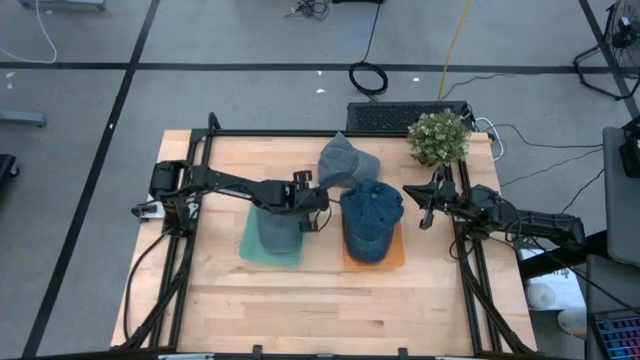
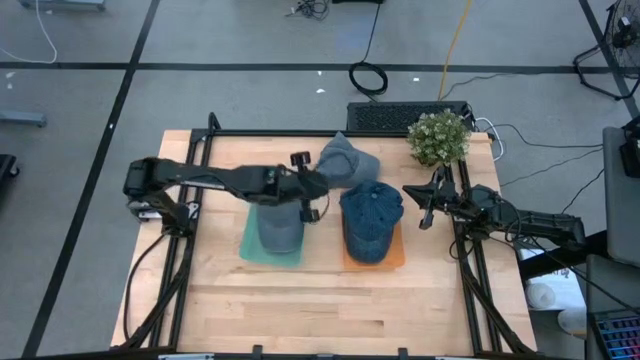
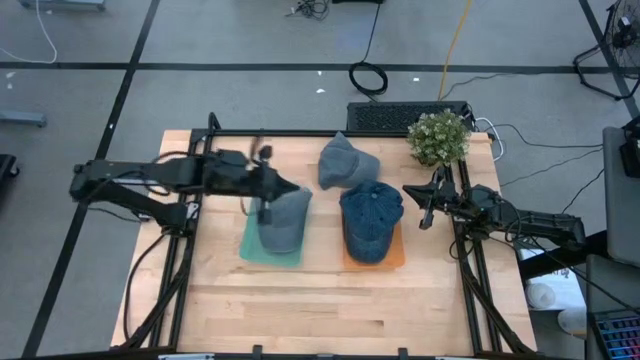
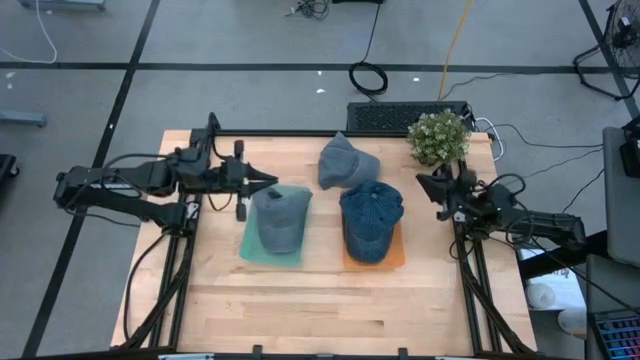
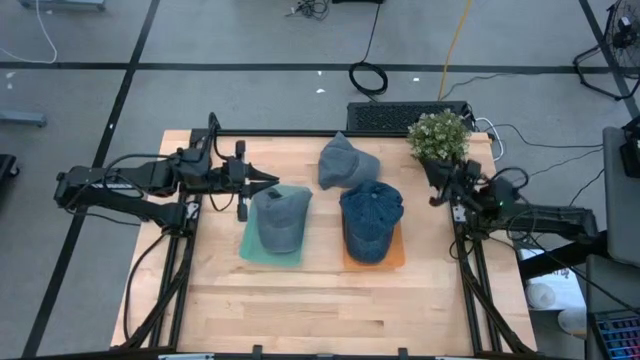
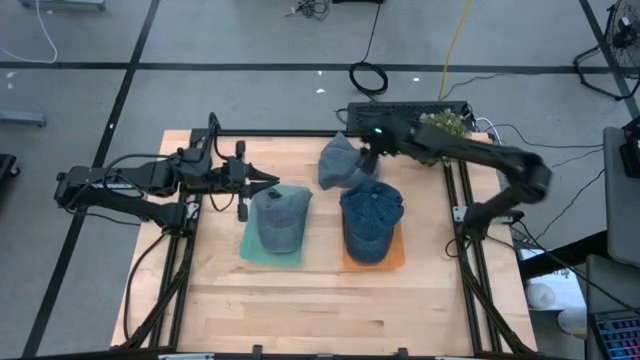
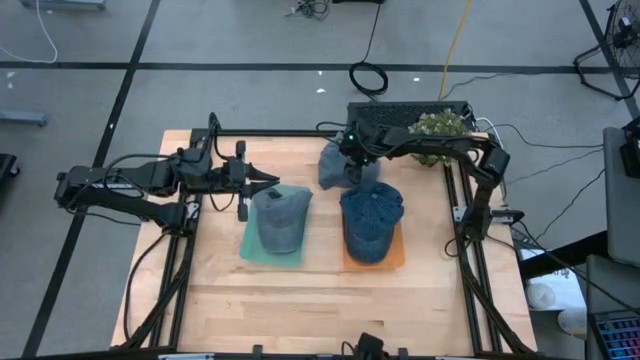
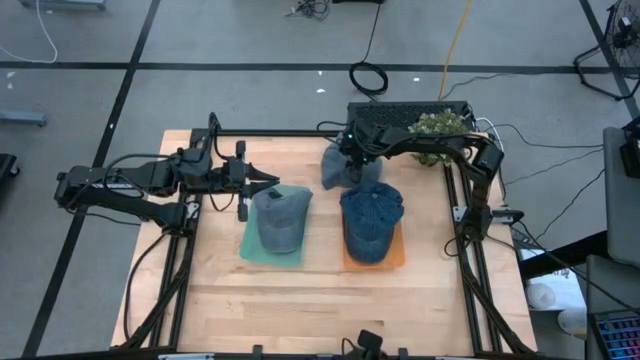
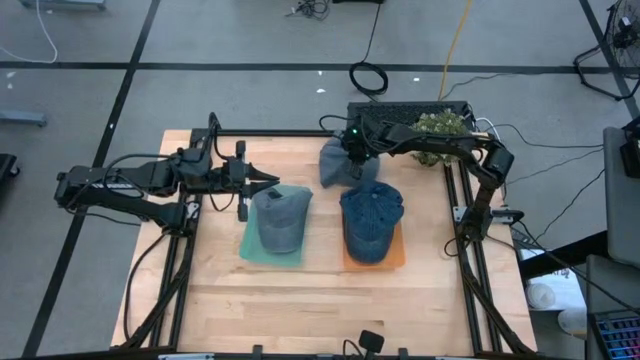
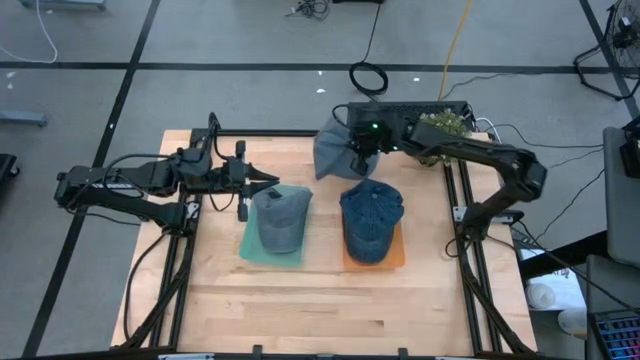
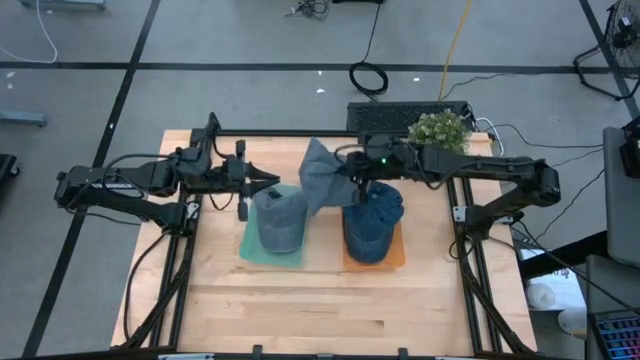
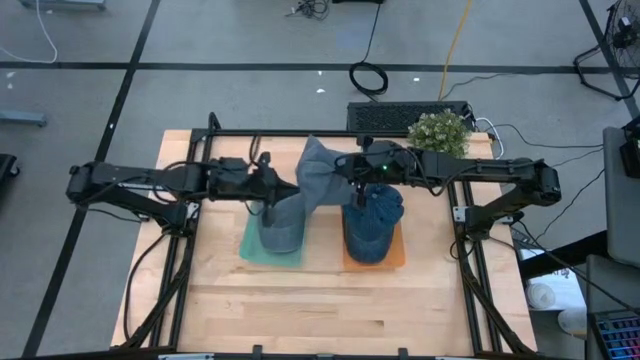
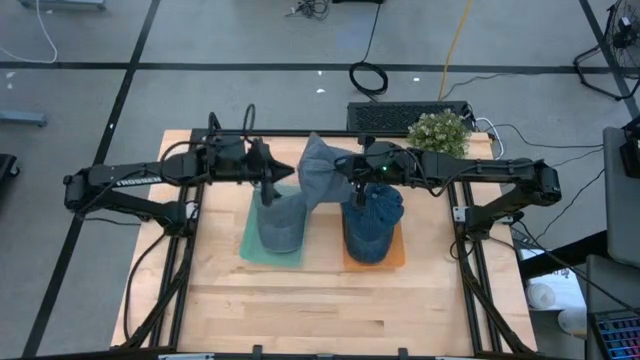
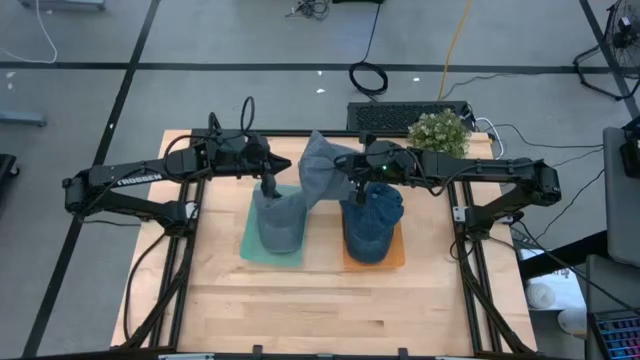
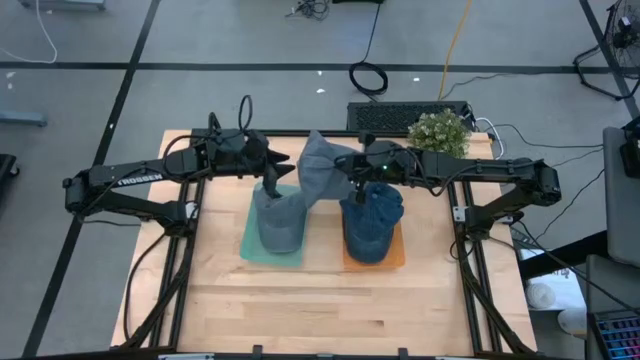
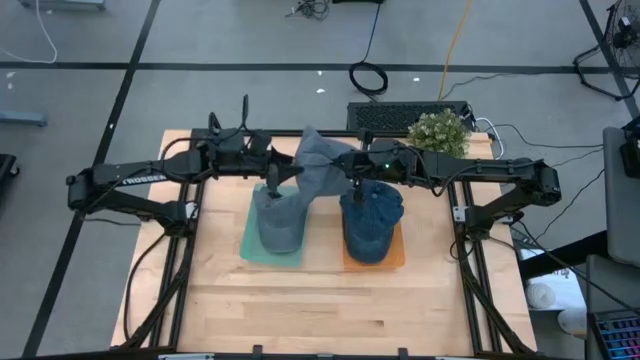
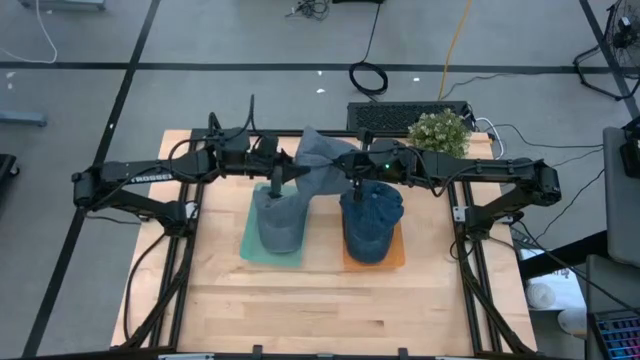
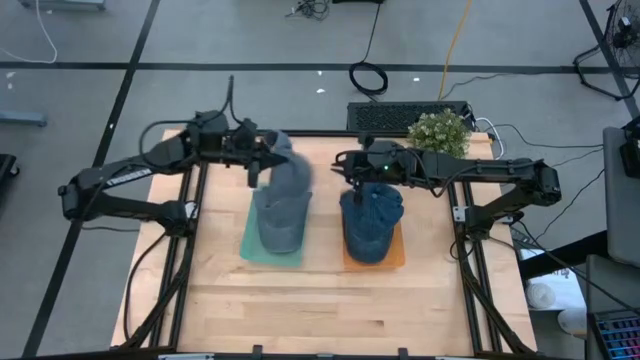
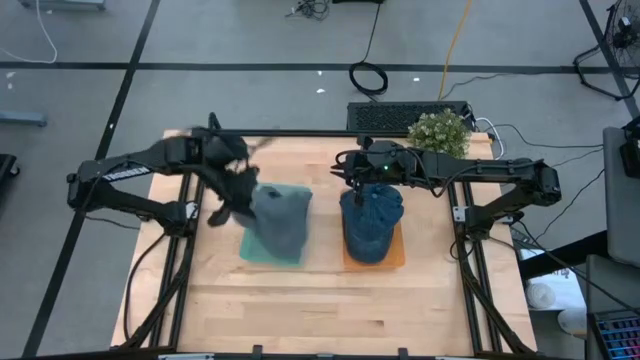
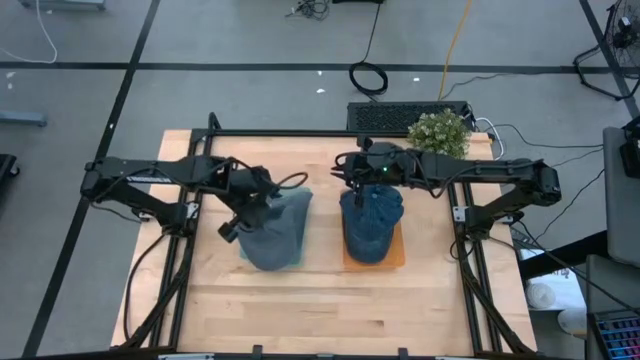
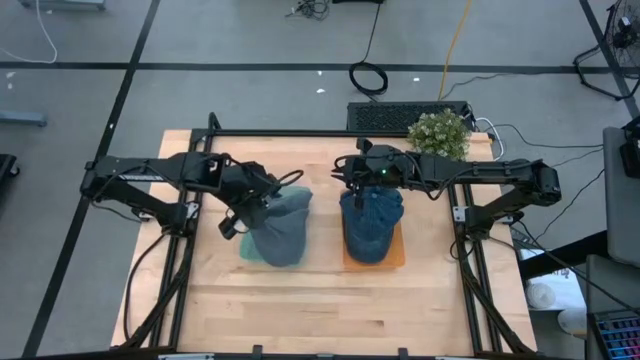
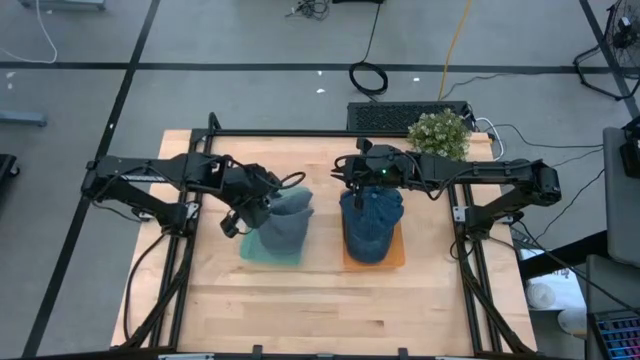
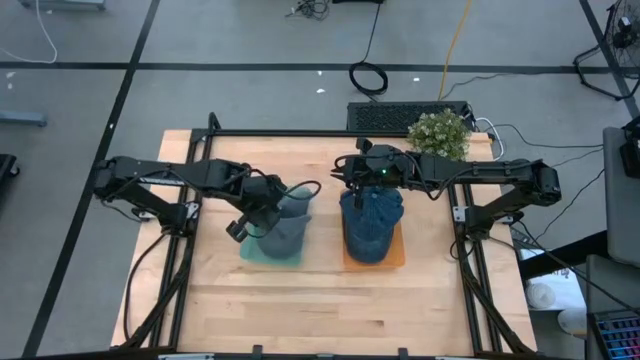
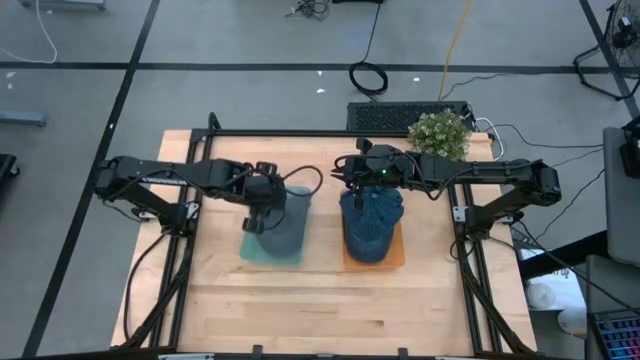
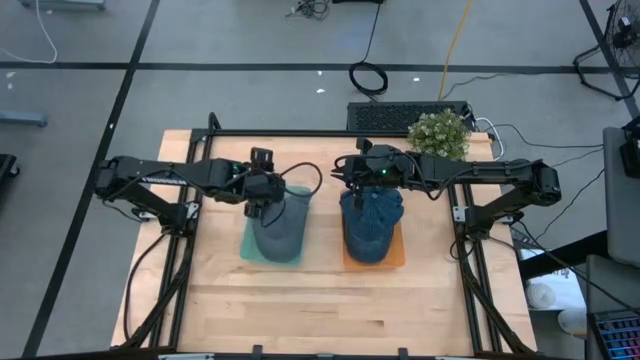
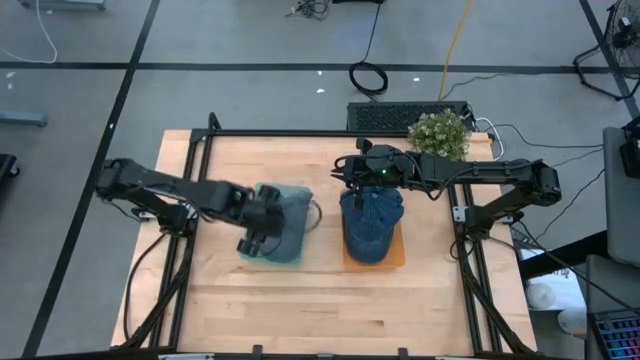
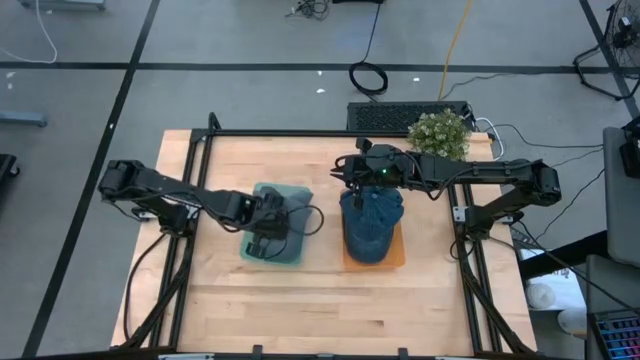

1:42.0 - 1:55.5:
Task: Pick & Place hat
Put the gray cap into the light blue bin

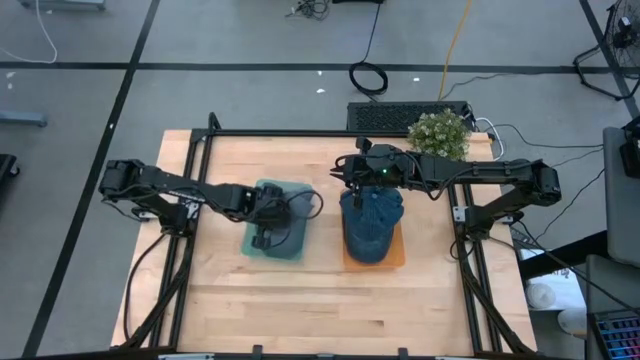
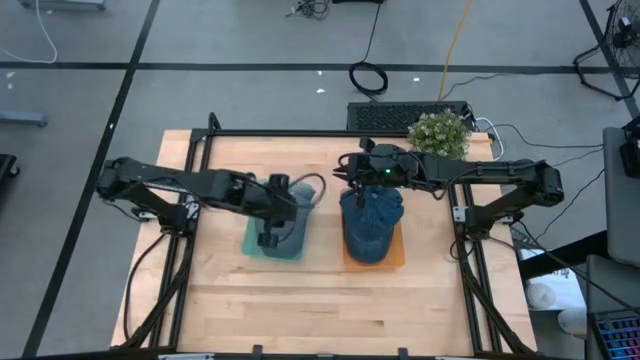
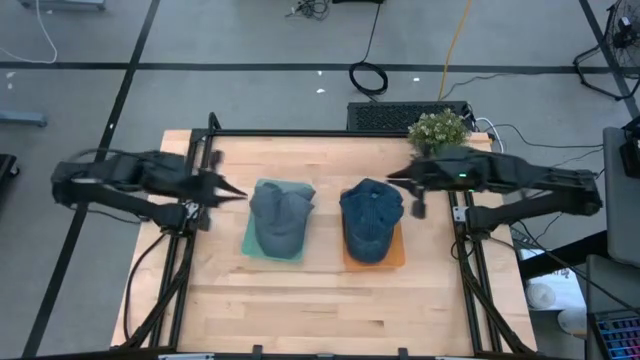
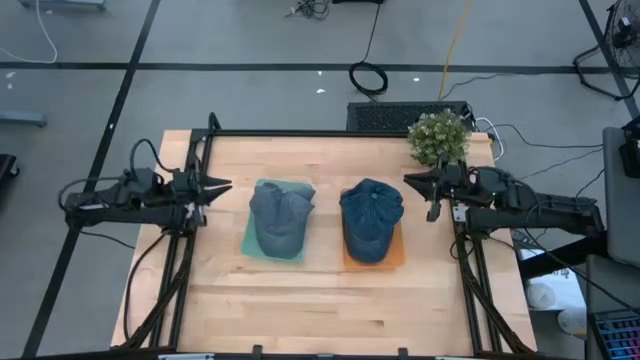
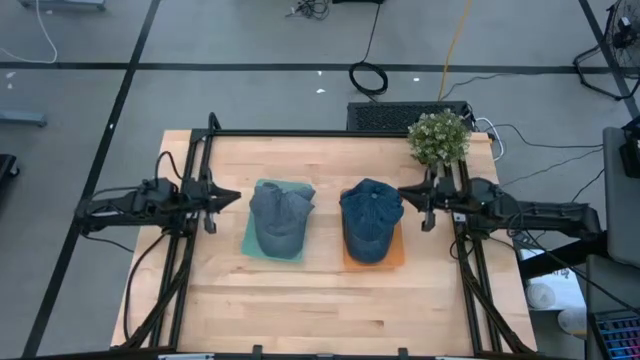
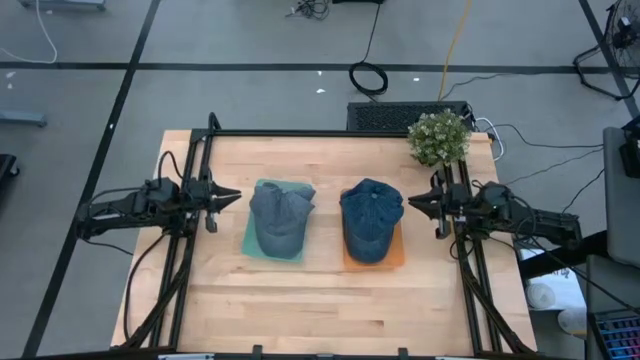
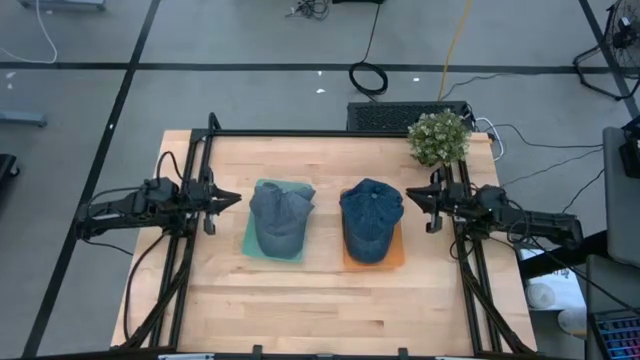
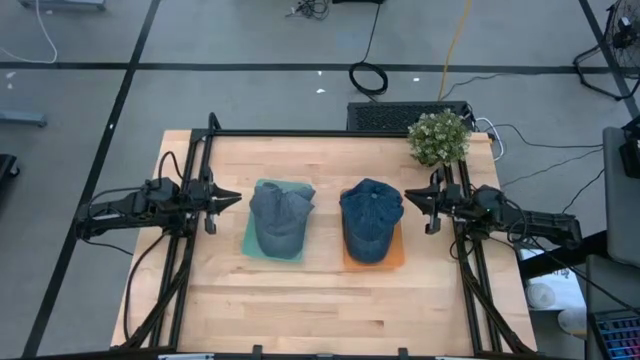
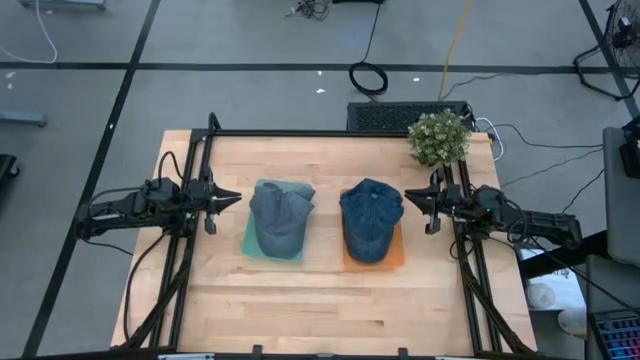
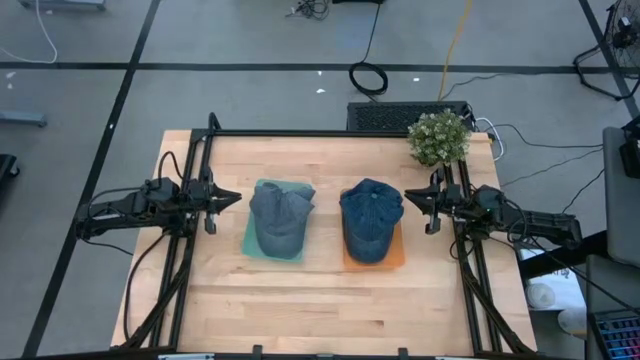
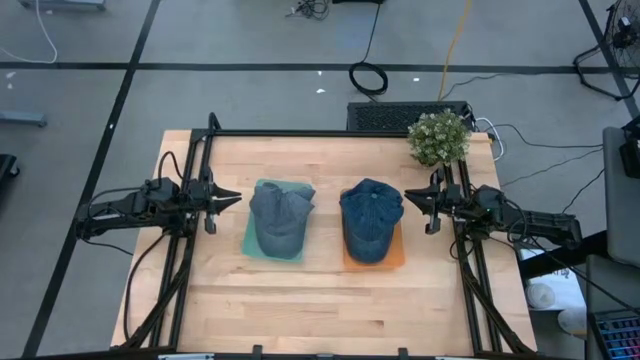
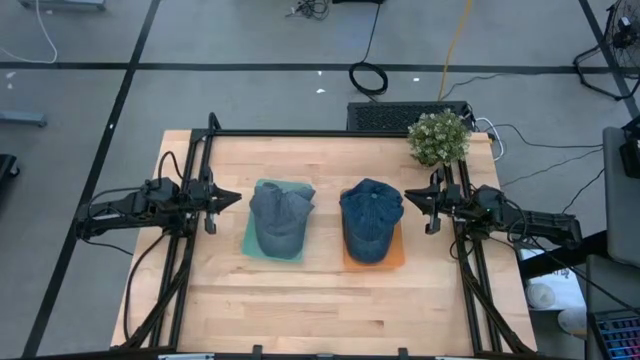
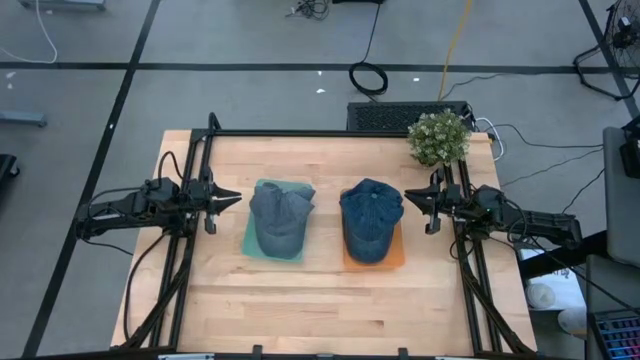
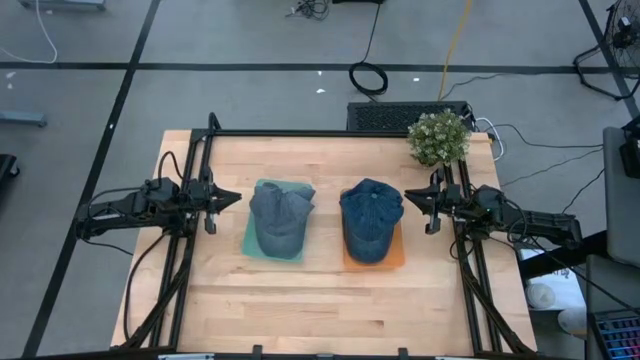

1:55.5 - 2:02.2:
Return to Home Position

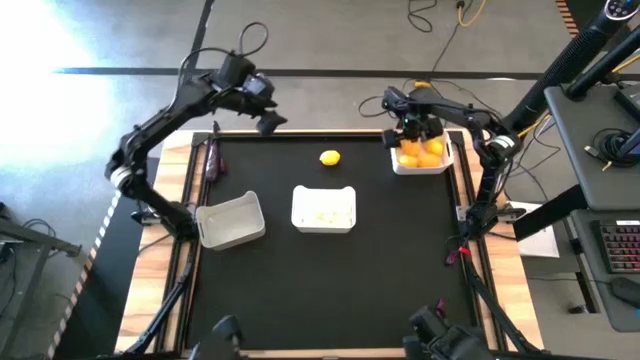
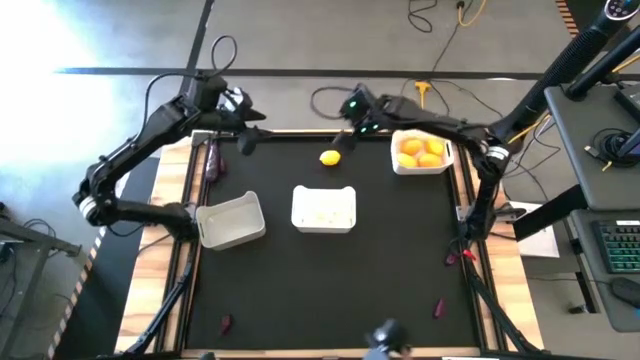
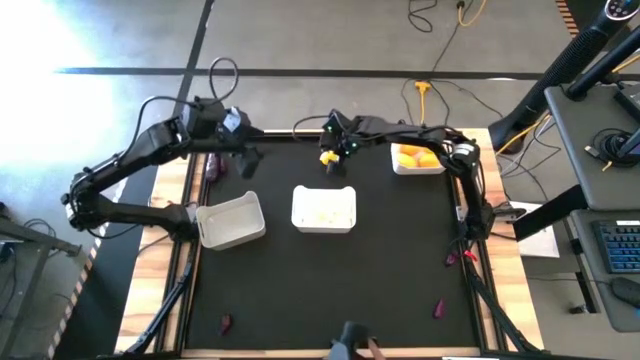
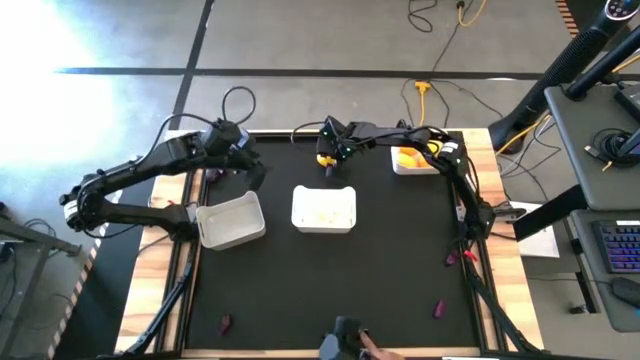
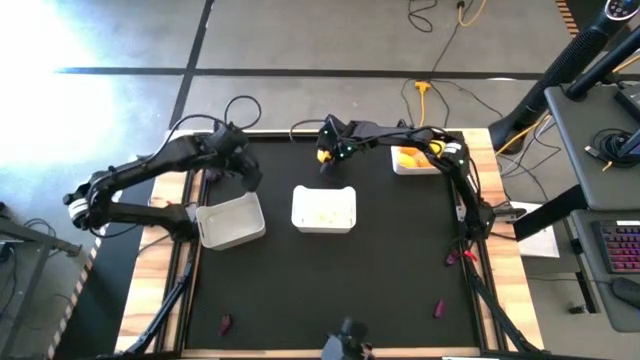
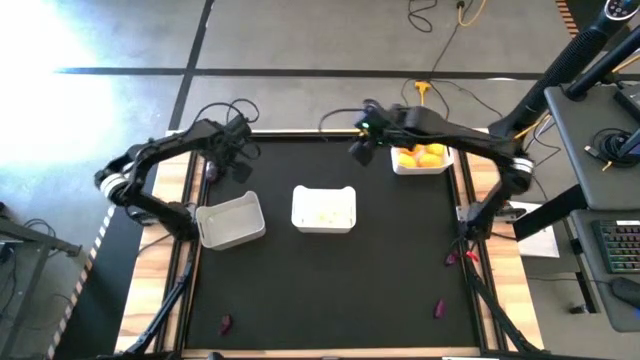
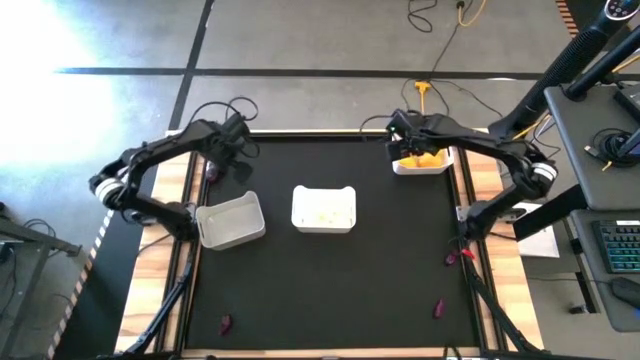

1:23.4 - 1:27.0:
Task: Sort produce into baskets
Put the yellow lemon into the top white bin
